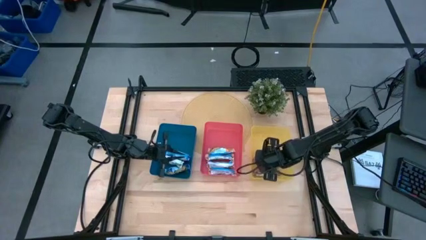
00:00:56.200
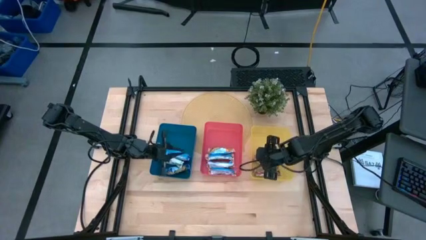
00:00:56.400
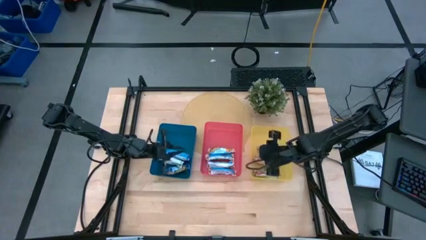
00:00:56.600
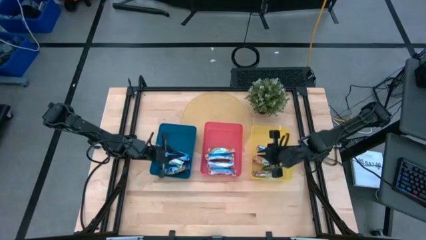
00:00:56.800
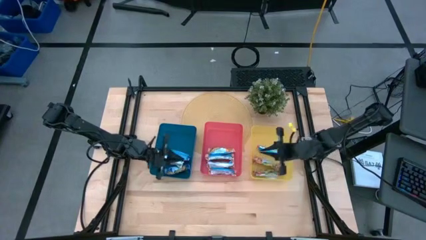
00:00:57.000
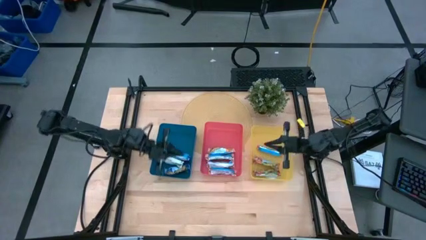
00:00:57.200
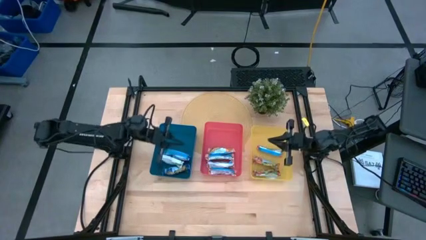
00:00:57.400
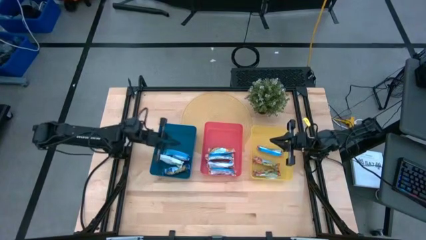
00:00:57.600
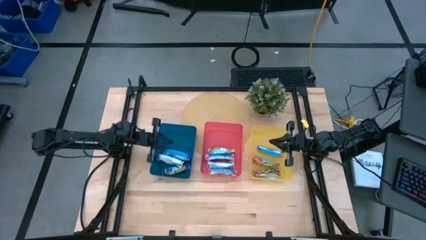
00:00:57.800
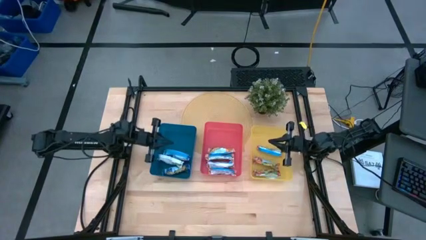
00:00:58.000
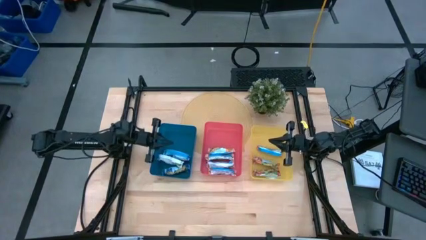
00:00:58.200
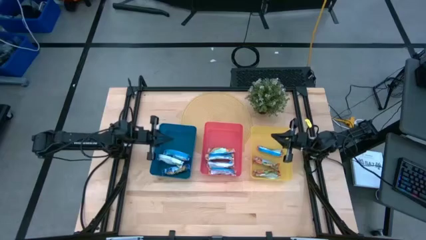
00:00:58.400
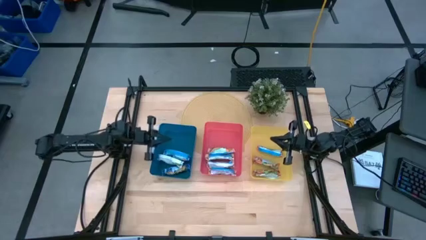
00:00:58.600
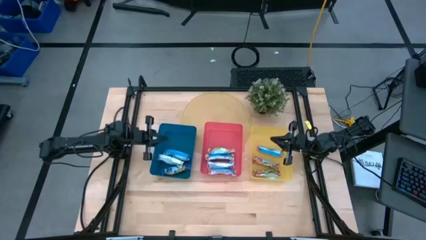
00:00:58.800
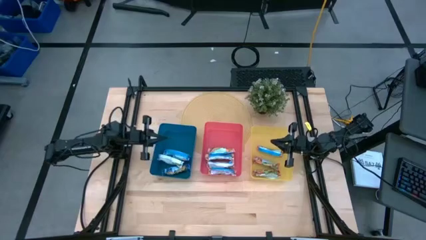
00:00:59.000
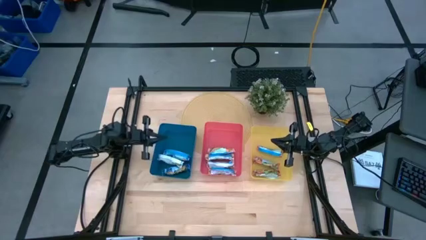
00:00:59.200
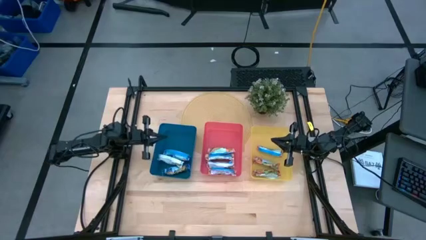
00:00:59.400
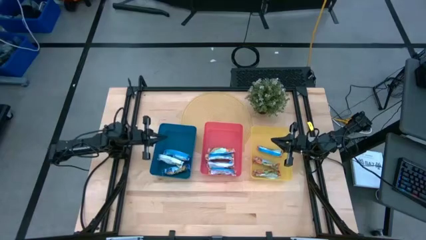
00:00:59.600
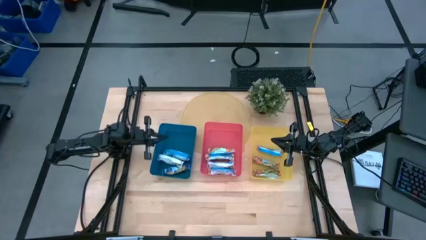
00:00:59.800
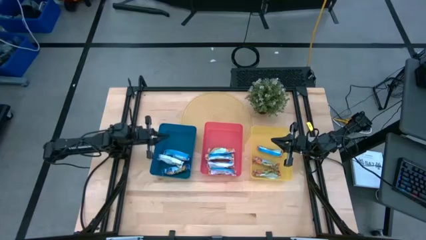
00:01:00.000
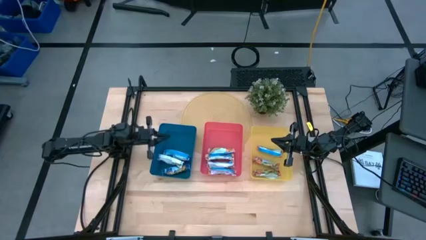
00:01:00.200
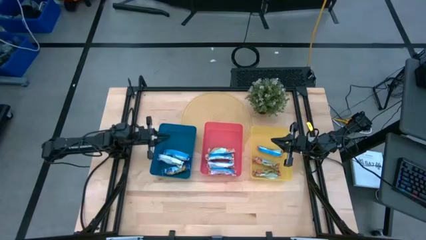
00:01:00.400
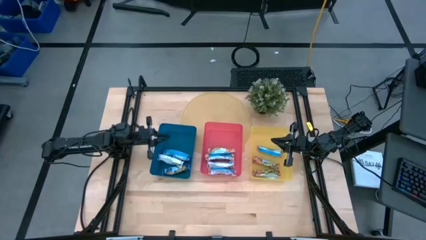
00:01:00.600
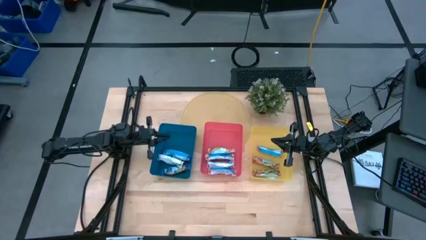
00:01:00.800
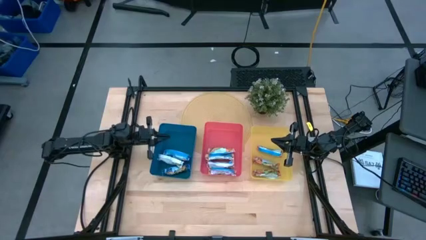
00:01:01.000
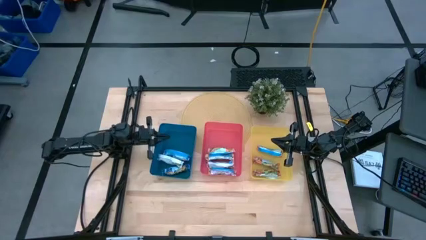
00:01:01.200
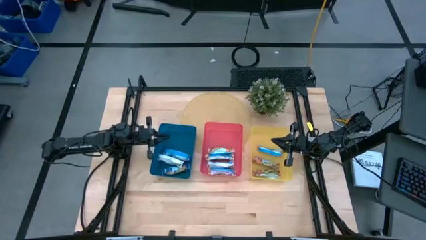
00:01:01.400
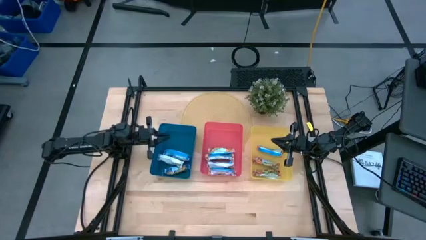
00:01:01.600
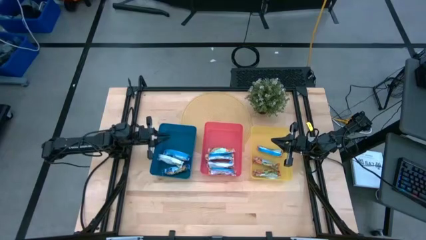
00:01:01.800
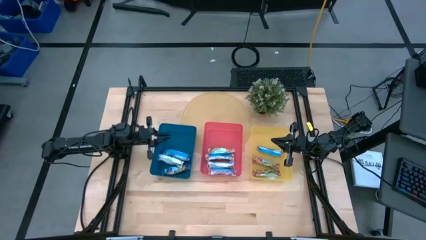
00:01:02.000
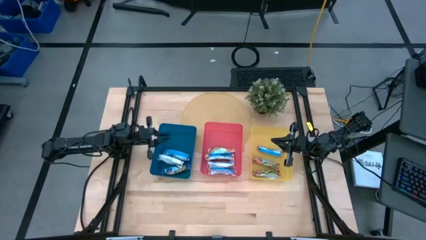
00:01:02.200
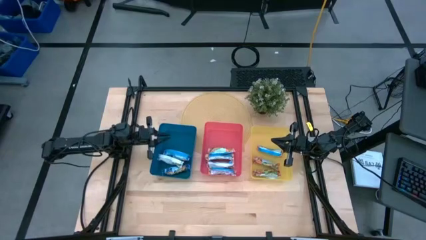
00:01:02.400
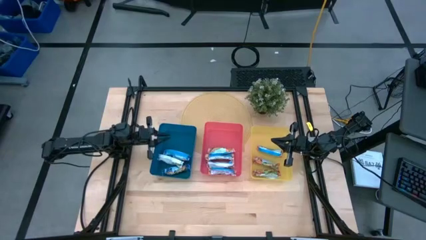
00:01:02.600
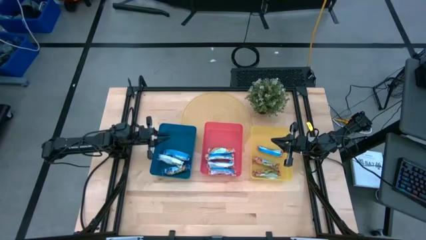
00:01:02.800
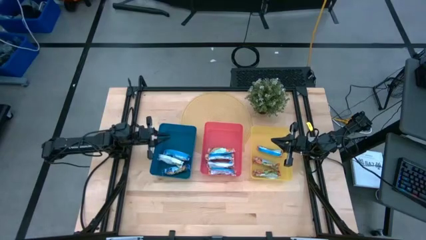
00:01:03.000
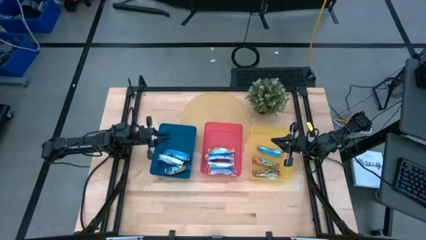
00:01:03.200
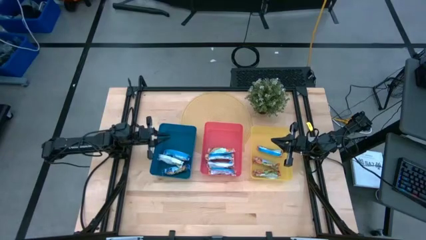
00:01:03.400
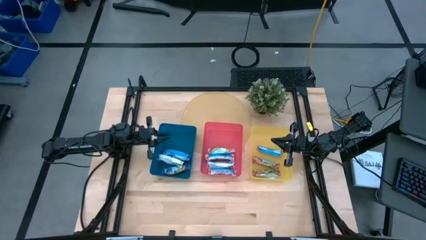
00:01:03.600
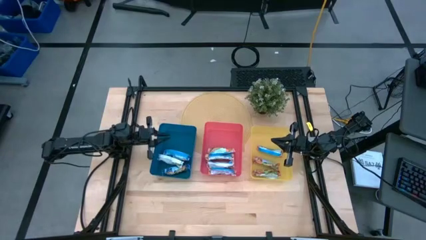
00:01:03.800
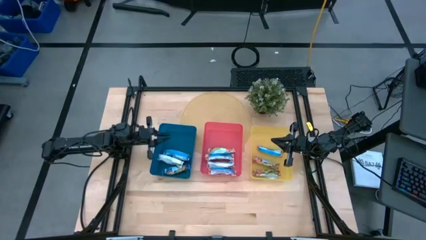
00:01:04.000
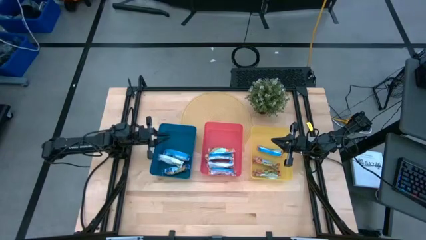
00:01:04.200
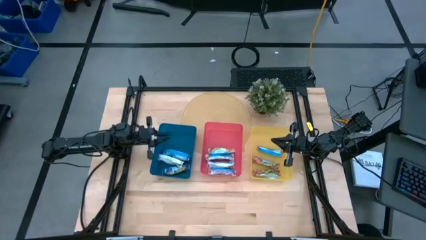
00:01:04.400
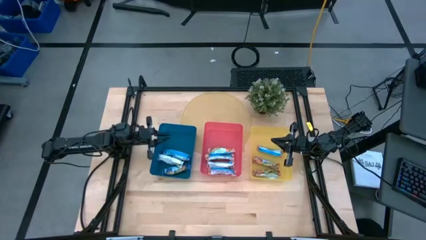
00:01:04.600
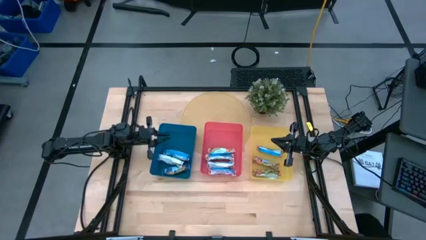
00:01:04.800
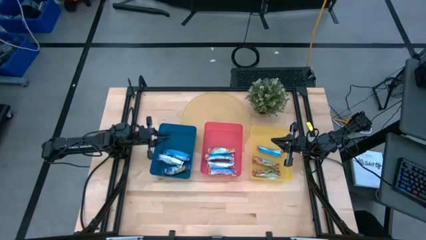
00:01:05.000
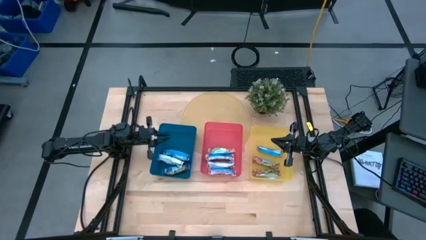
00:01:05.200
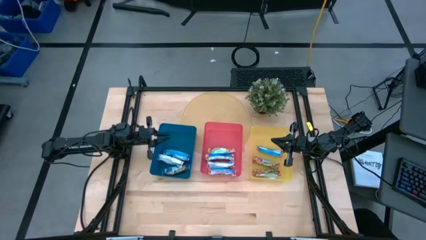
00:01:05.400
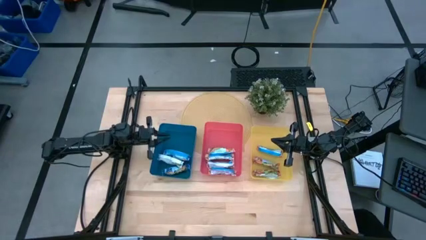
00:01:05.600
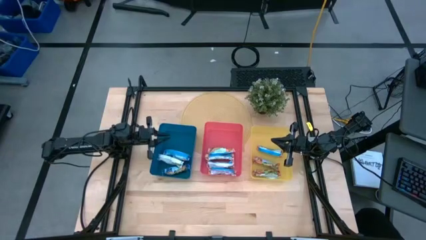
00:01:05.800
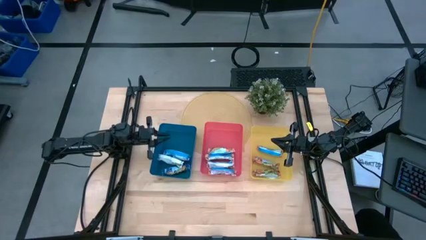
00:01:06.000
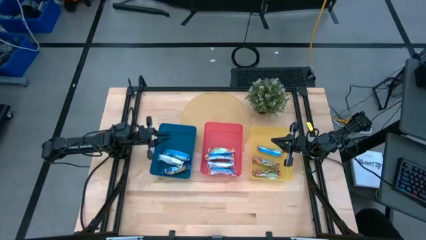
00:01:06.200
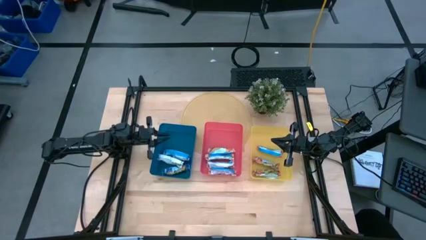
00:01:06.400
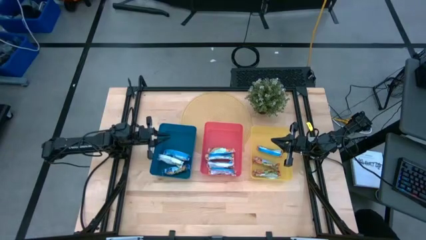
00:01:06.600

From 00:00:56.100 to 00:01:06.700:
Task: Pick and place Granola Bars by type
Return to Home Position
